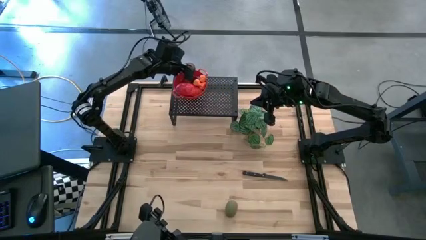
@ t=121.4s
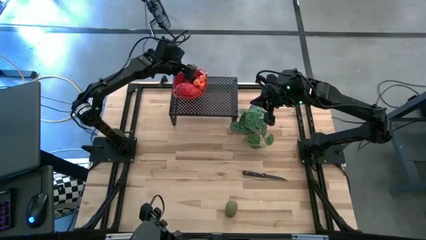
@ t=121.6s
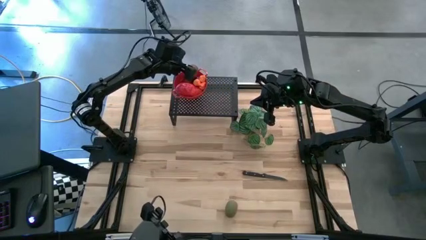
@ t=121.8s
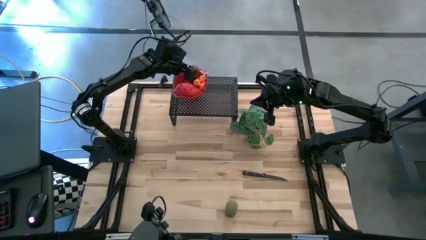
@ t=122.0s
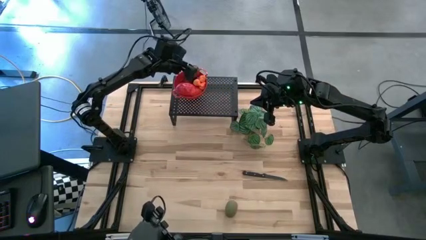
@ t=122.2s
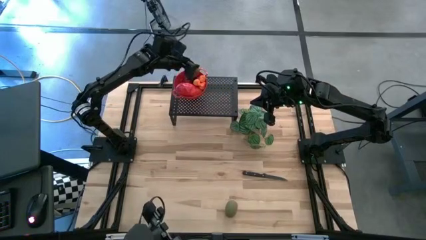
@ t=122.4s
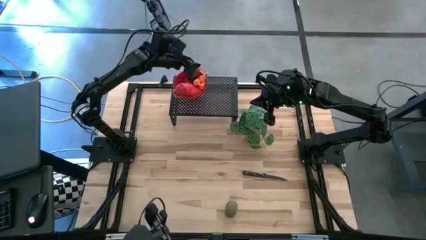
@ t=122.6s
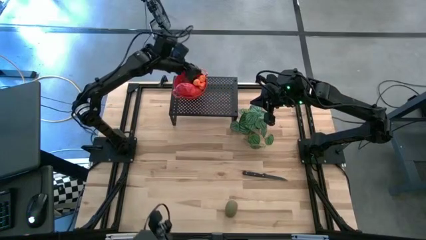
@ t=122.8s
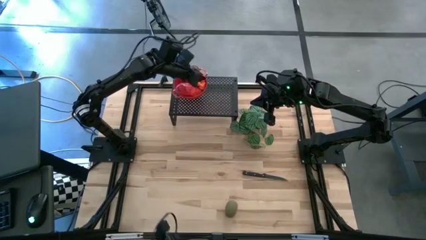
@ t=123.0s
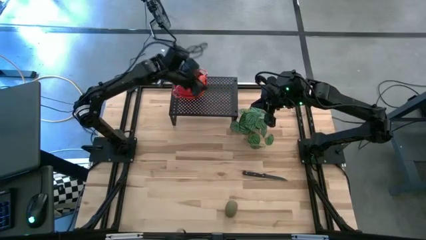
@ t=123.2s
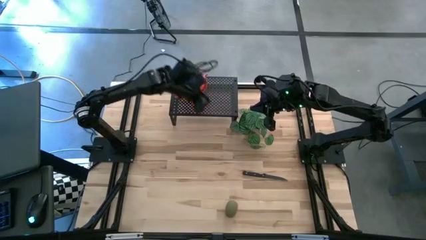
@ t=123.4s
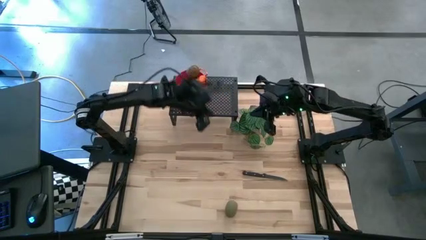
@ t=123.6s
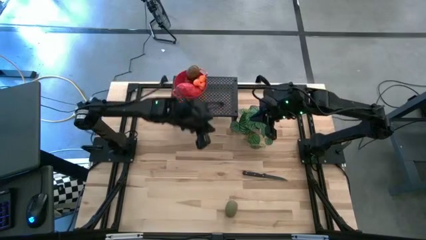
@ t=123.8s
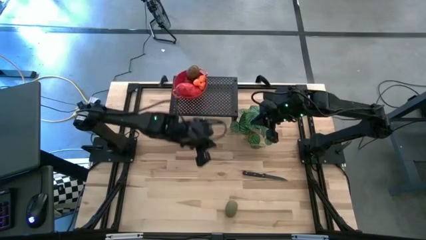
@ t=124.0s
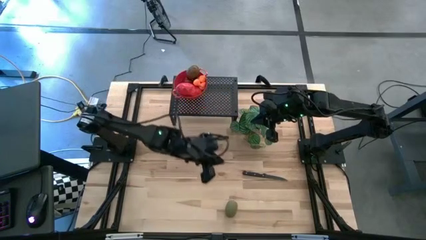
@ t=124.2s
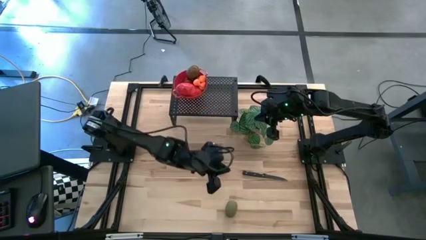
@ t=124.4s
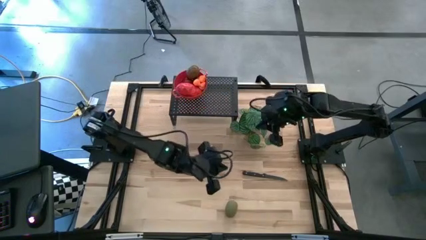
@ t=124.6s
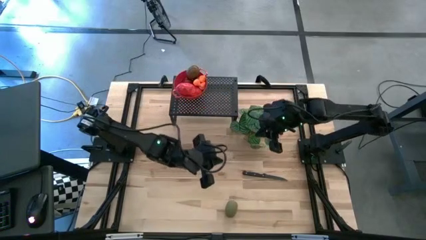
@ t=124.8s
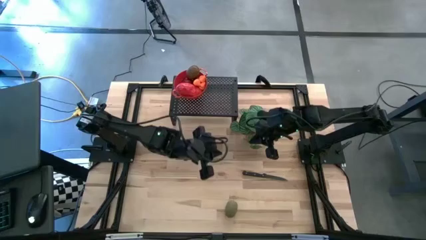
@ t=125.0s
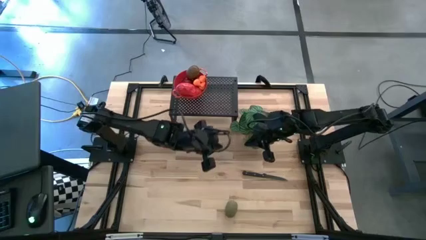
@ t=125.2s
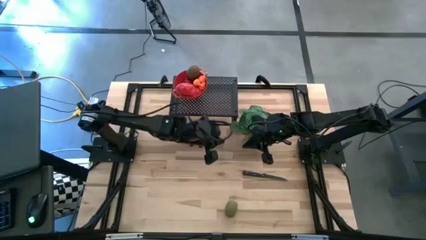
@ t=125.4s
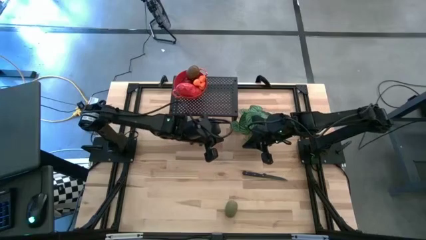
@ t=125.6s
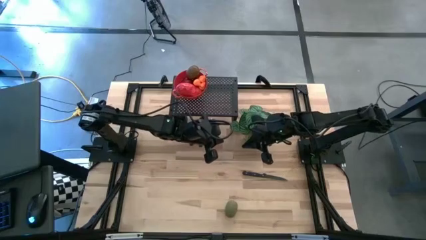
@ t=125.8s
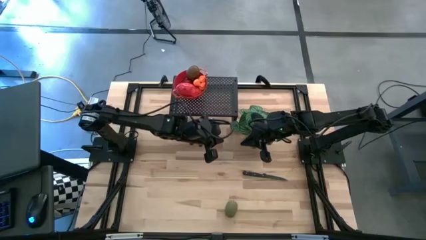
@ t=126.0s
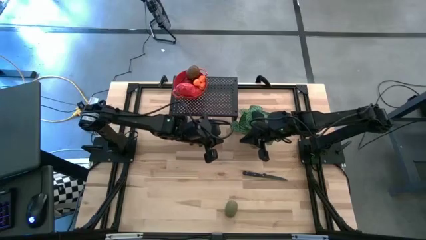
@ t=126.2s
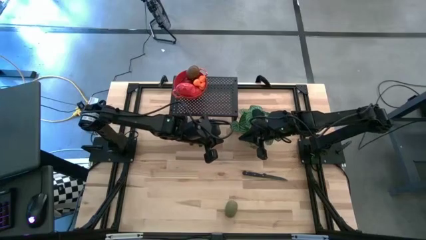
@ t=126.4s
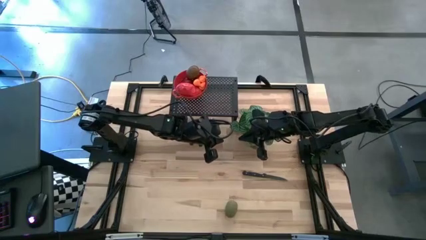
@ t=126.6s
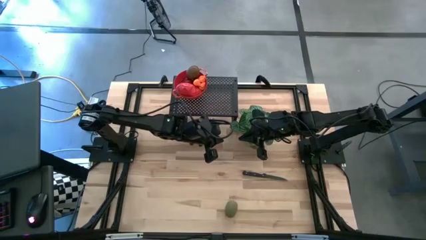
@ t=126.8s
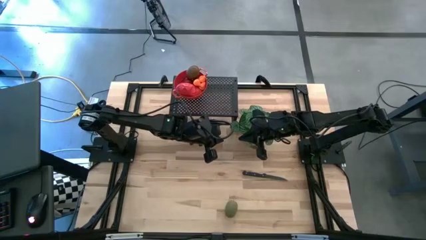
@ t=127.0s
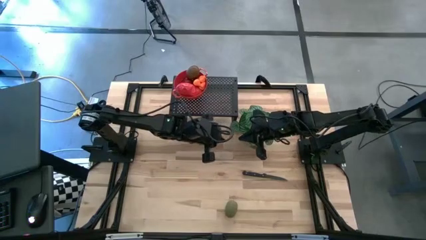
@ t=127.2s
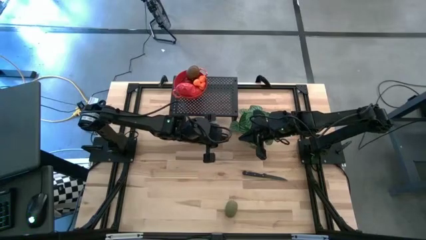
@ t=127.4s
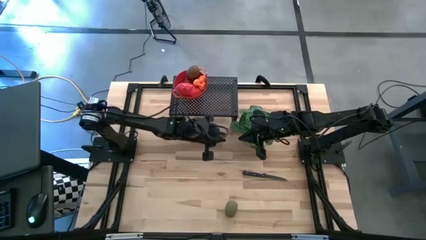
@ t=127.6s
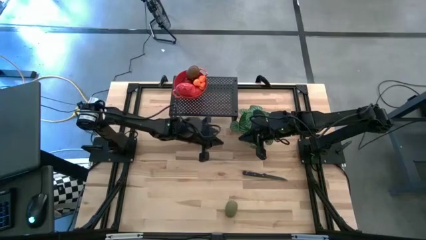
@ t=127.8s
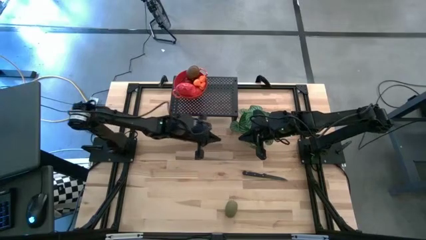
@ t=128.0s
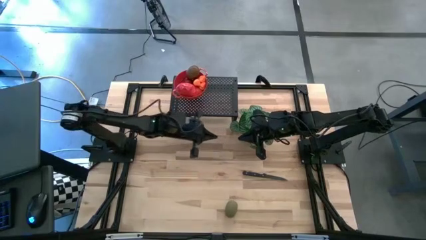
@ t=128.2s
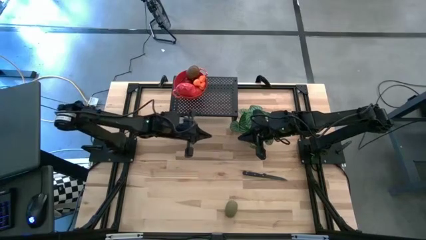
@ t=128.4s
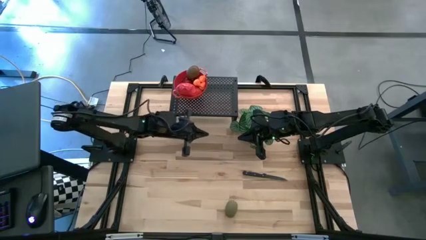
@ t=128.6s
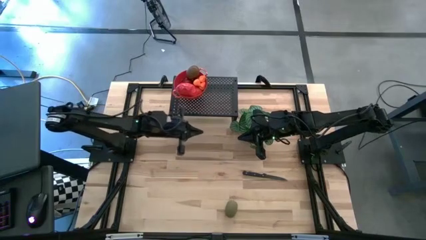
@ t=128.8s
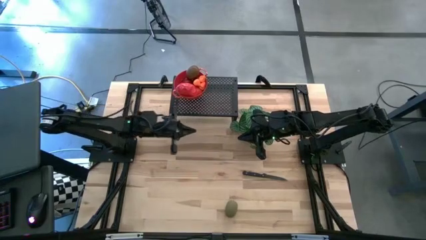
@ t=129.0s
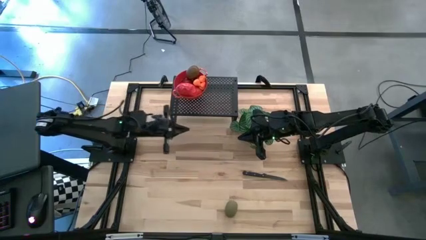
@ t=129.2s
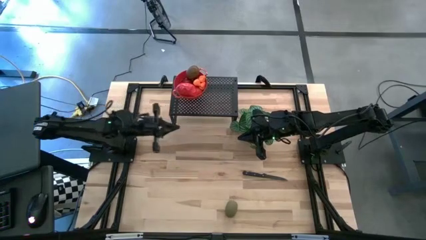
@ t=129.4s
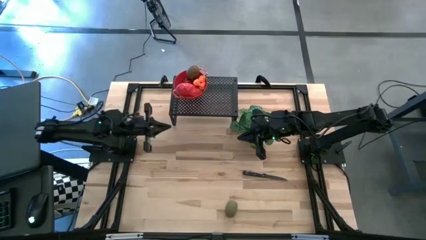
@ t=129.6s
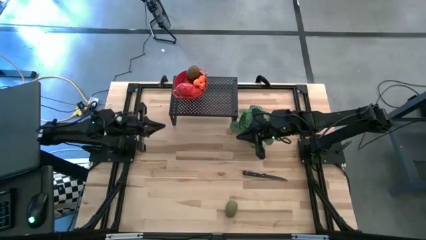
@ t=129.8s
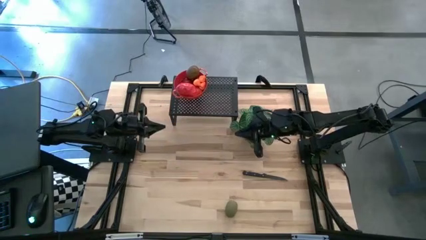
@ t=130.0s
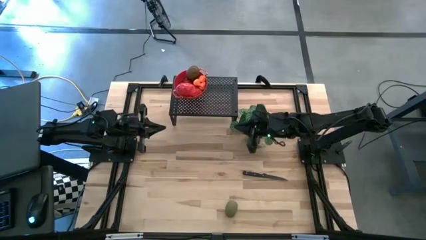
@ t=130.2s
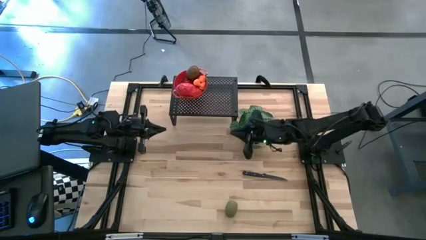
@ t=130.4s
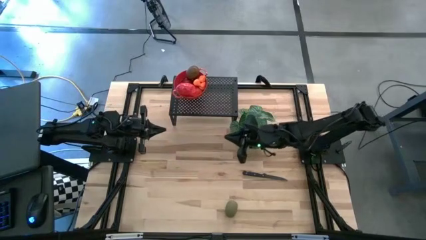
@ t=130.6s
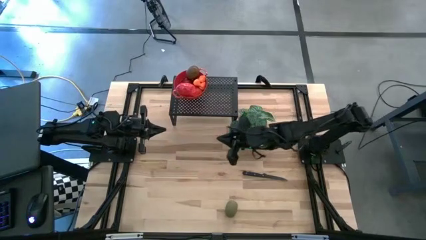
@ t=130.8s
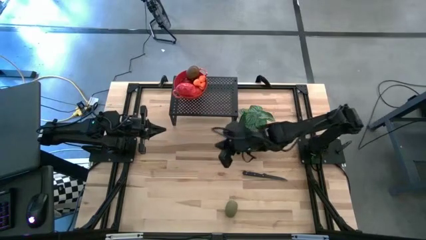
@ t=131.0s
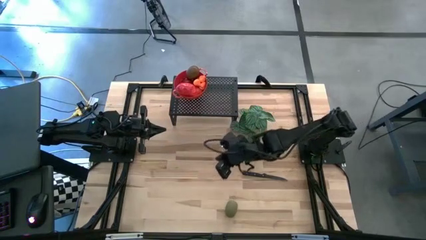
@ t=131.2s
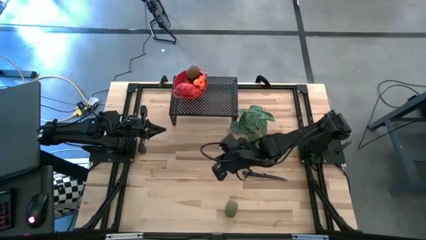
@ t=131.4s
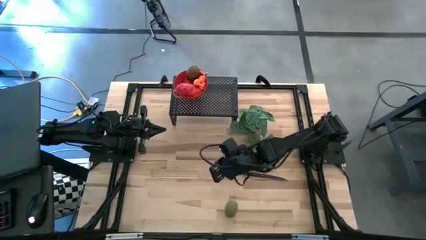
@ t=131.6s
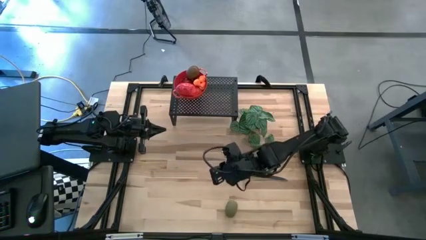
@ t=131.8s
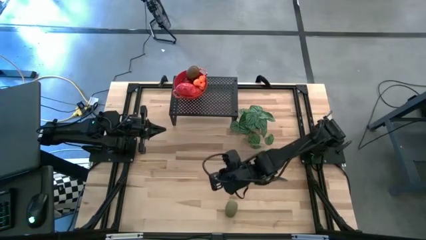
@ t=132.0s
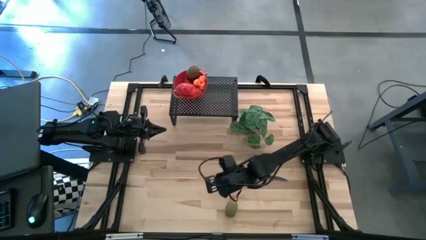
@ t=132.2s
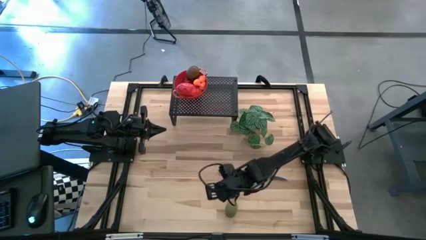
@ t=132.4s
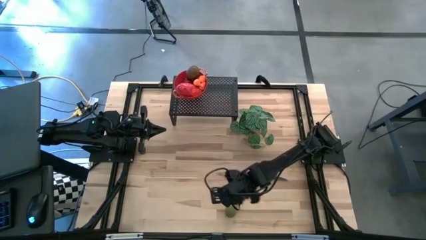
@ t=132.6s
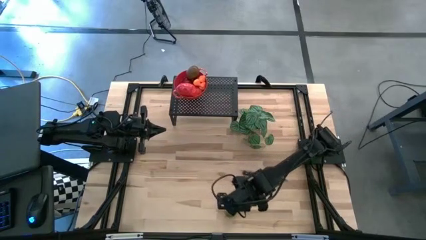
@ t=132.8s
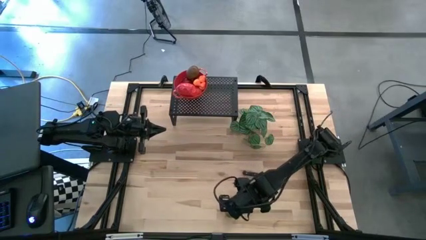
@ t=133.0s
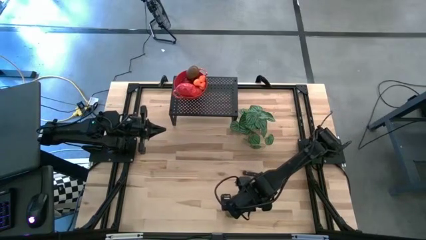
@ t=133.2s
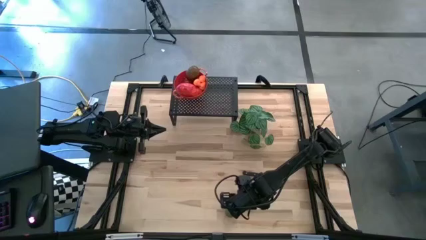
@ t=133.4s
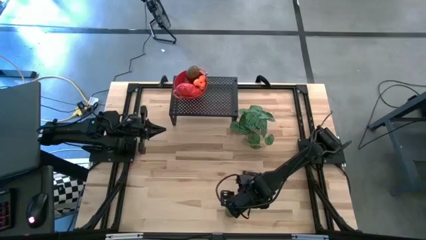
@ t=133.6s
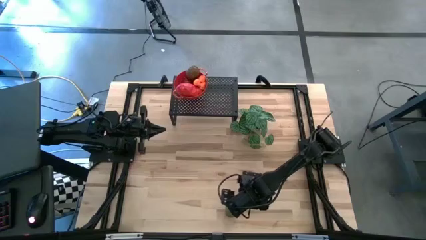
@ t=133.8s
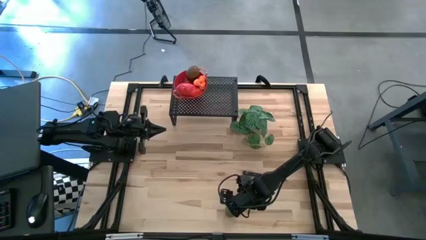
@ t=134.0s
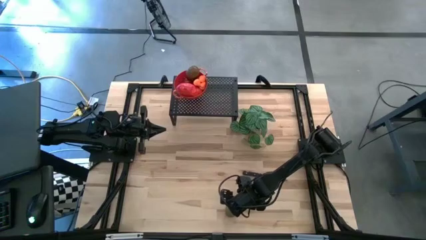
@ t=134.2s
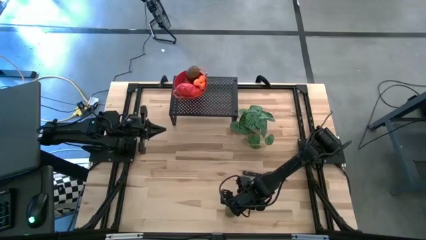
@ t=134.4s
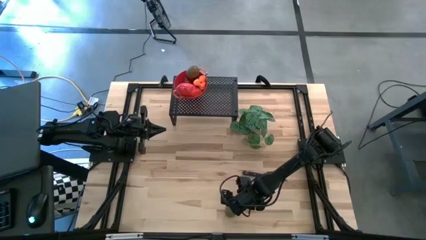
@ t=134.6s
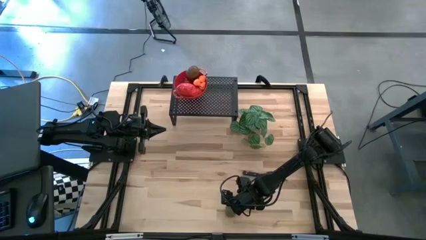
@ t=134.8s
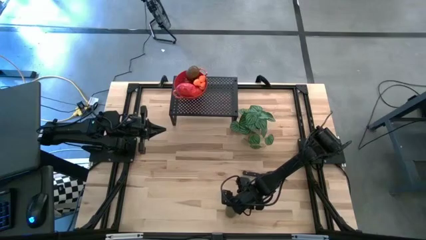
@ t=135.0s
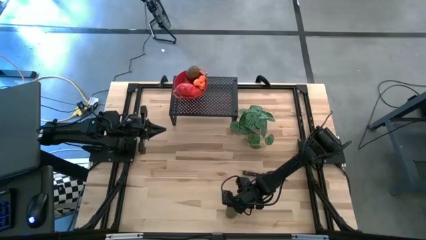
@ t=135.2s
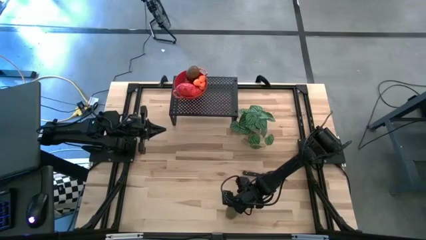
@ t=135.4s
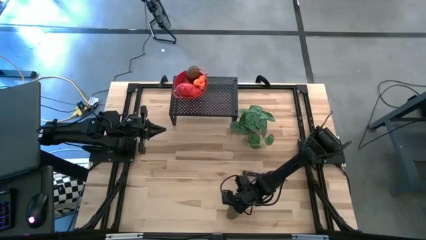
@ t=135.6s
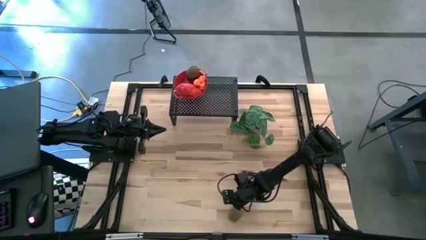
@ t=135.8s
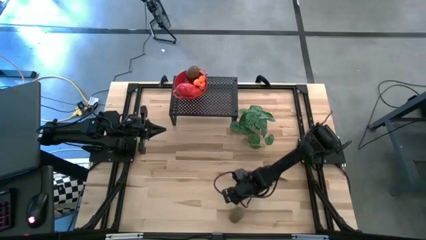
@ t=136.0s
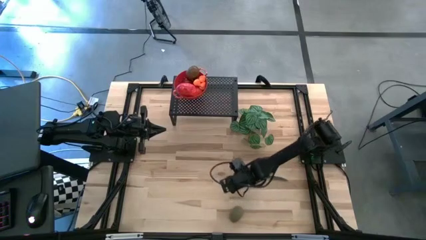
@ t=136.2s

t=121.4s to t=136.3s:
Task: Pick & Place Fruit
Put the brown kiwi in the red strainer bowl on the shelf
